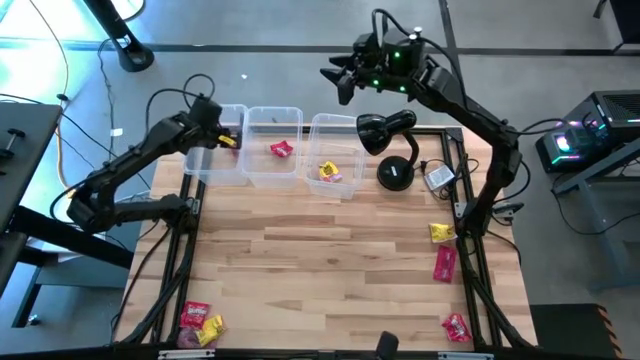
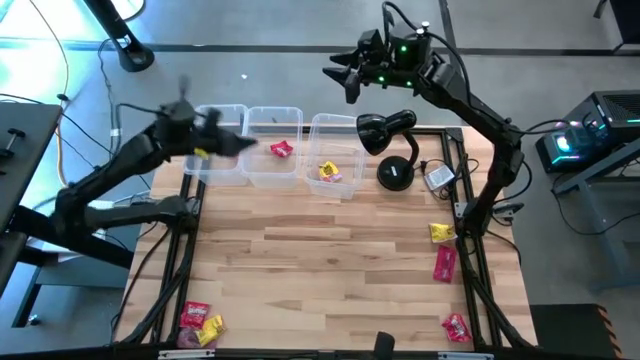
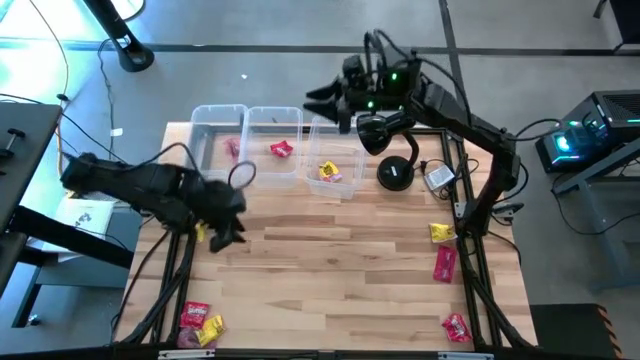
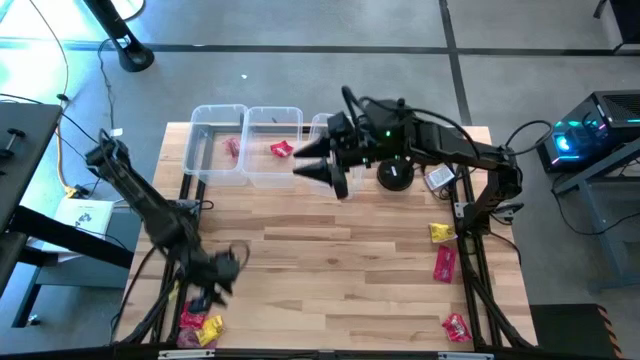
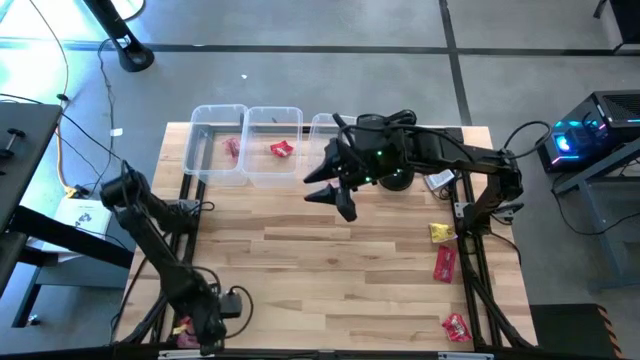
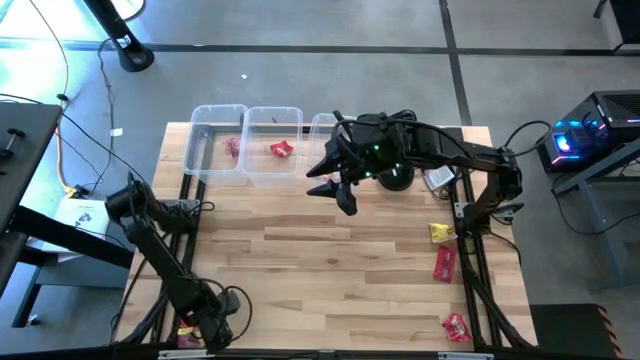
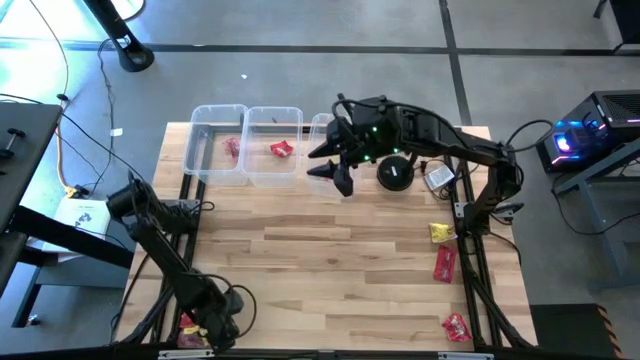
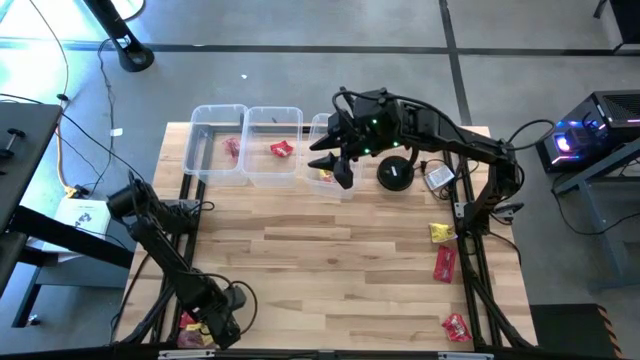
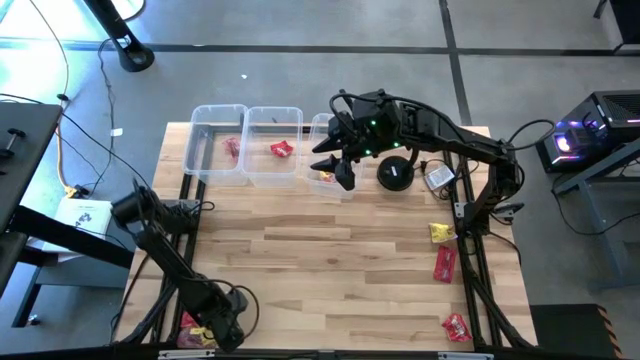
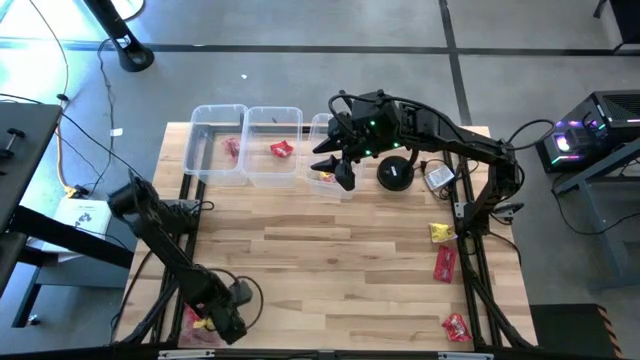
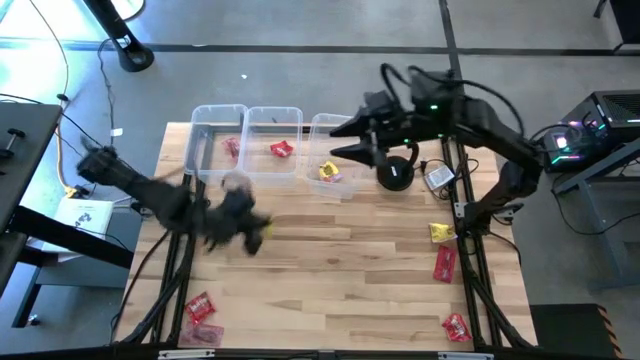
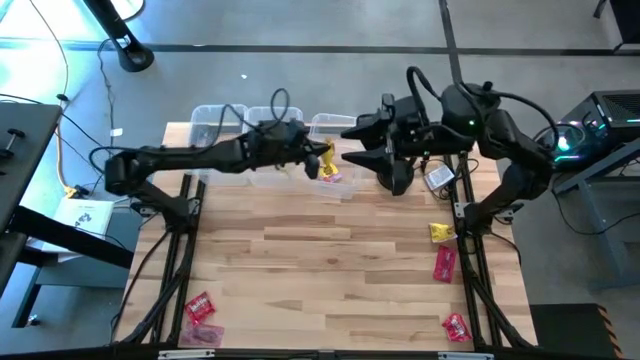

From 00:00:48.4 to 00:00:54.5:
Task: Sort candy
Put the yellow candy wrapper into the right transparent bin

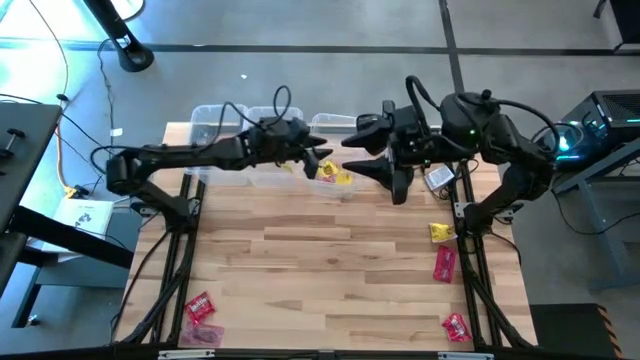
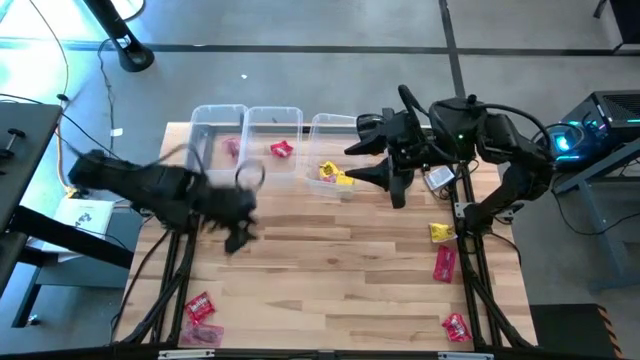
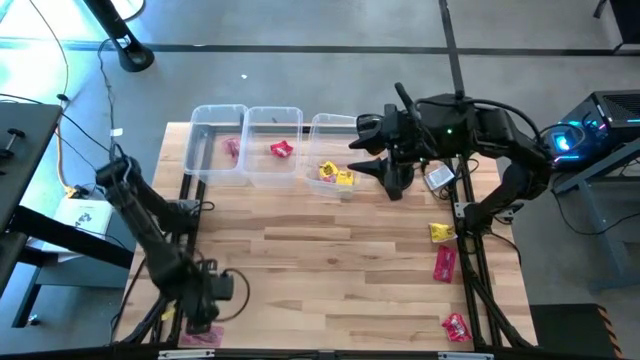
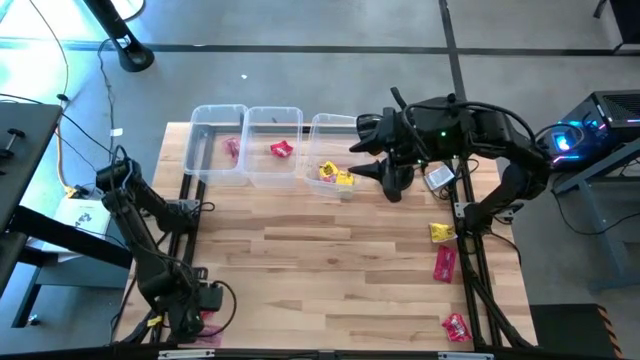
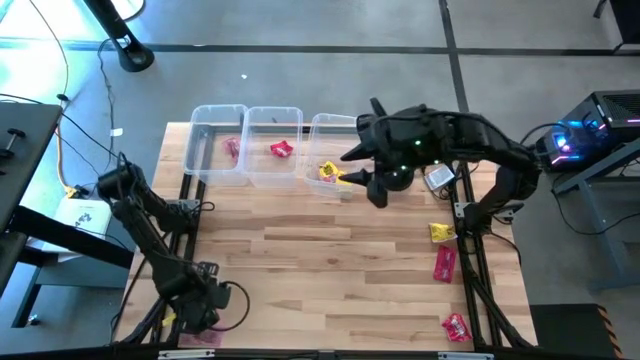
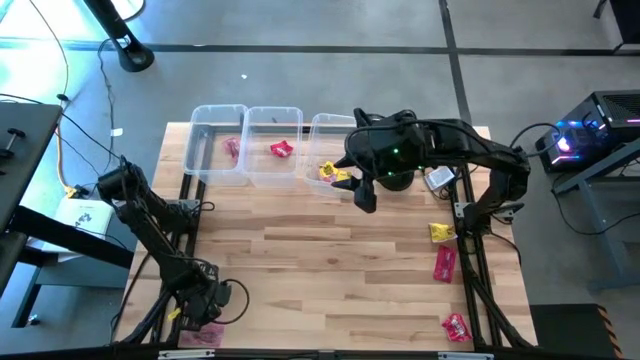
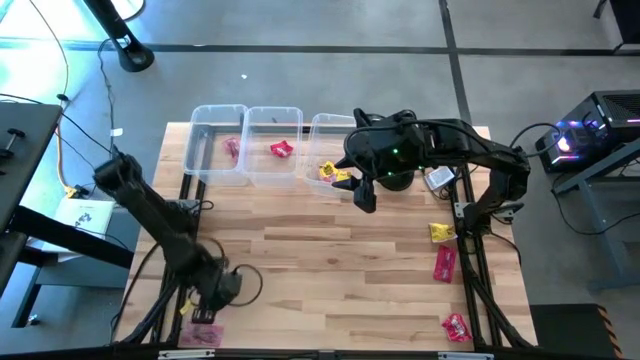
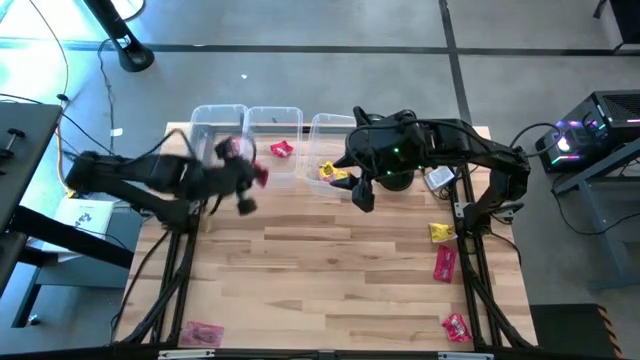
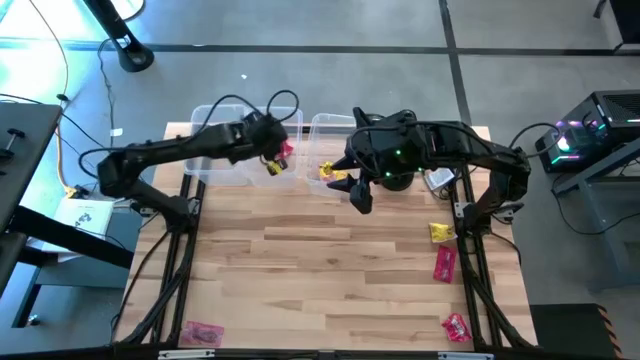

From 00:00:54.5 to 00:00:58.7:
Put the red candy wrapper into the middle transparent bin

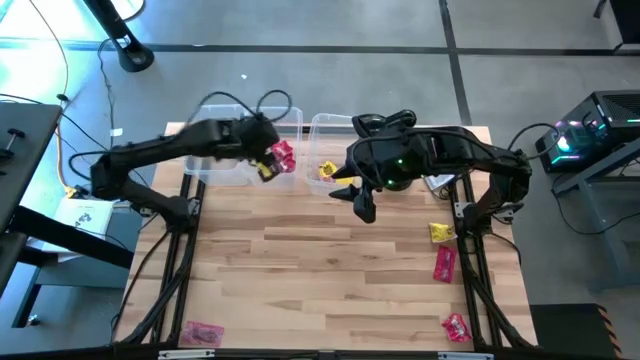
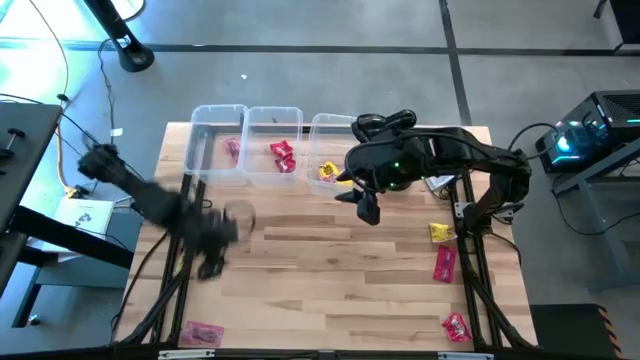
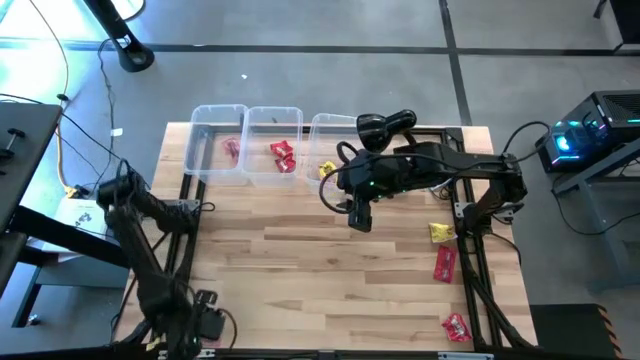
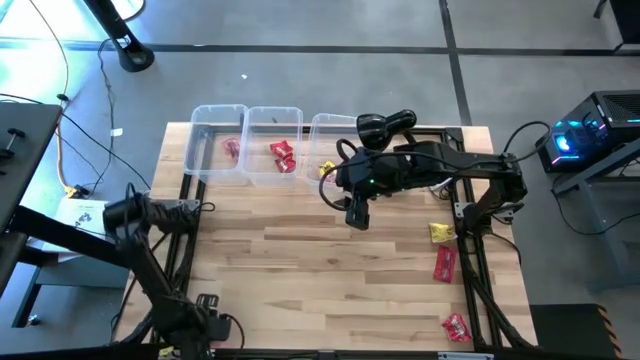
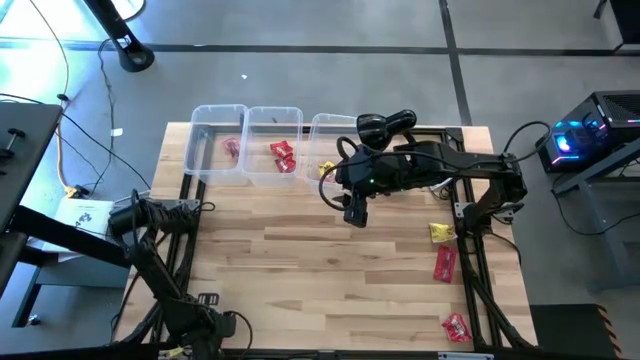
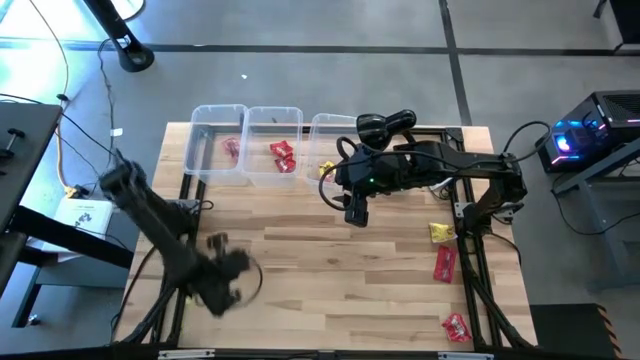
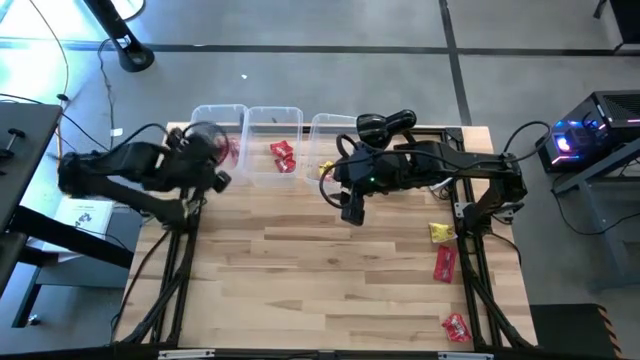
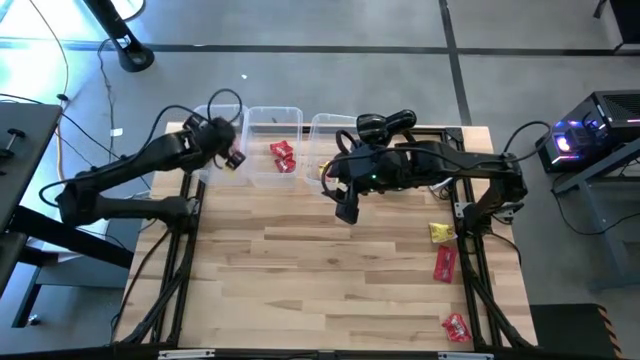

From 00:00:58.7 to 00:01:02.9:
Put the pink candy wrapper into the left transparent bin

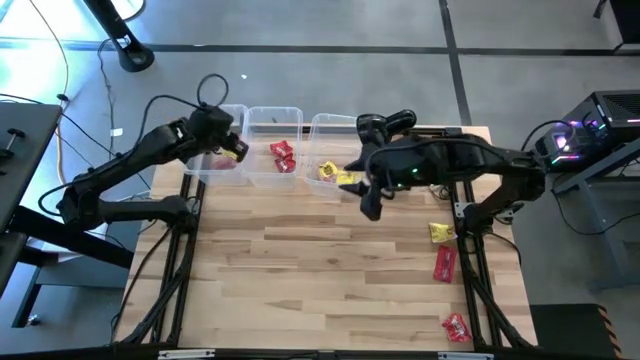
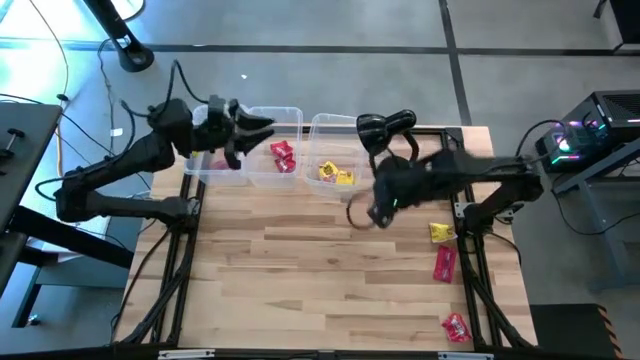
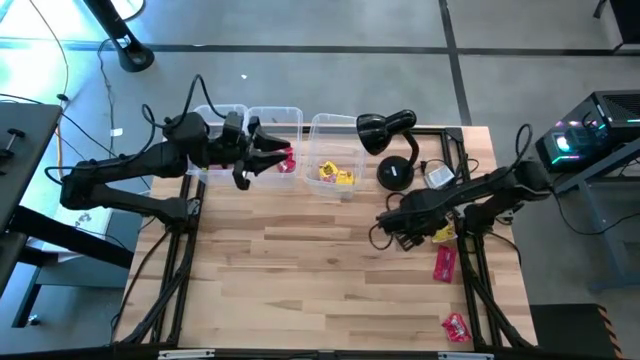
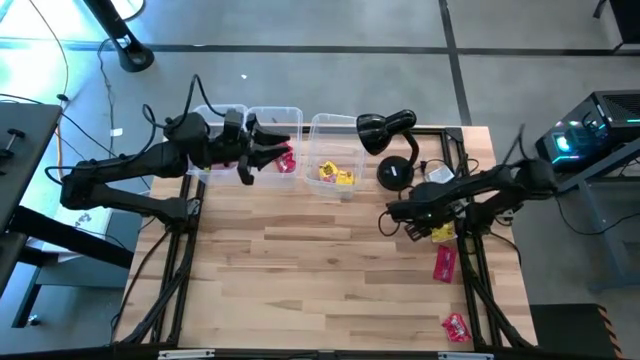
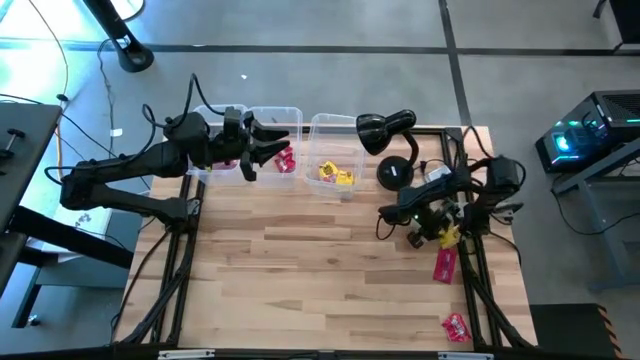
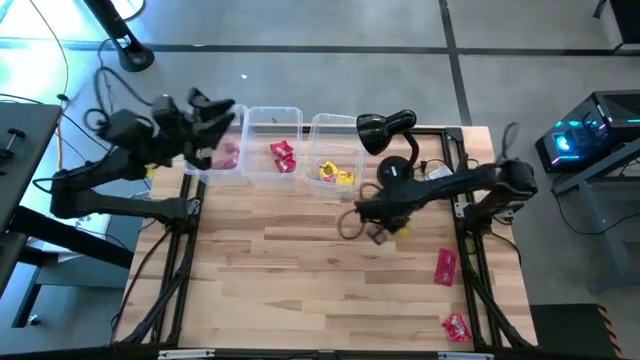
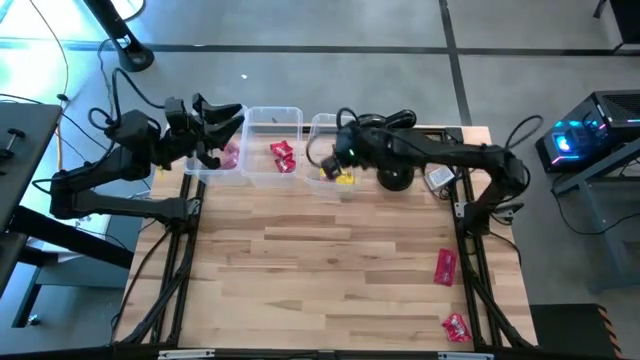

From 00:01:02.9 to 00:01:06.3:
Put the yellow candy wrapper into the right transparent bin

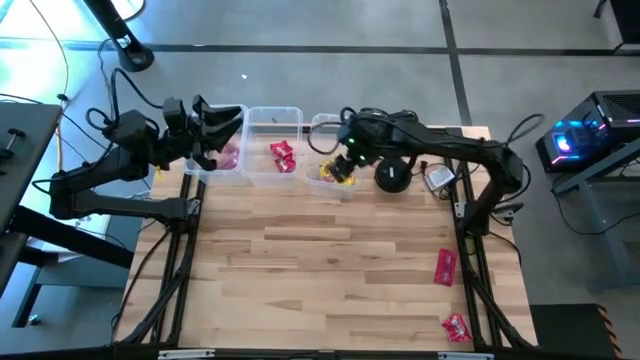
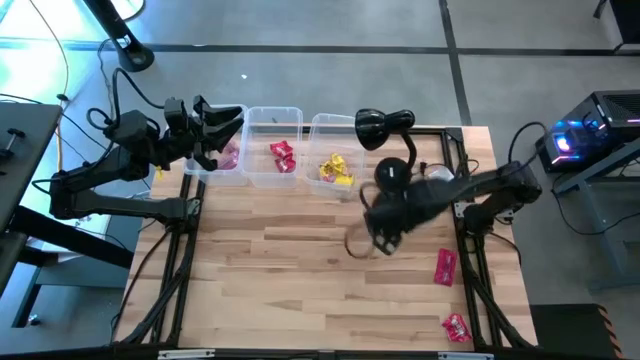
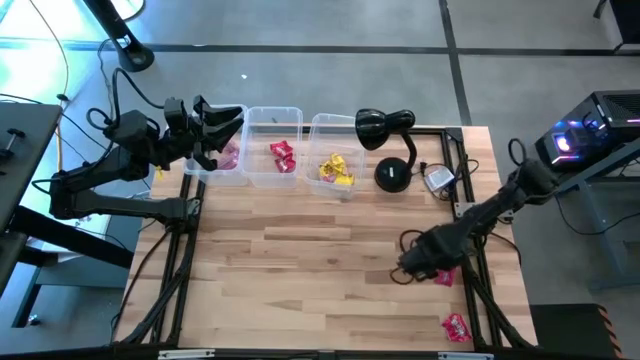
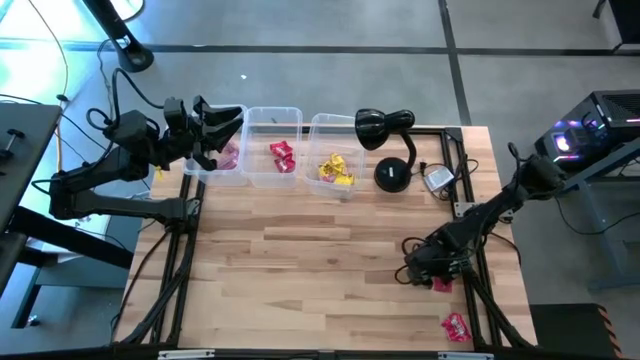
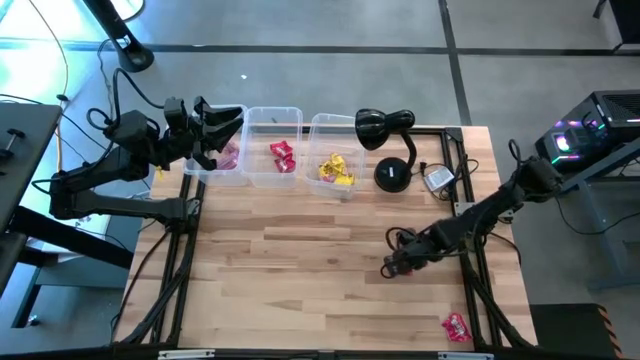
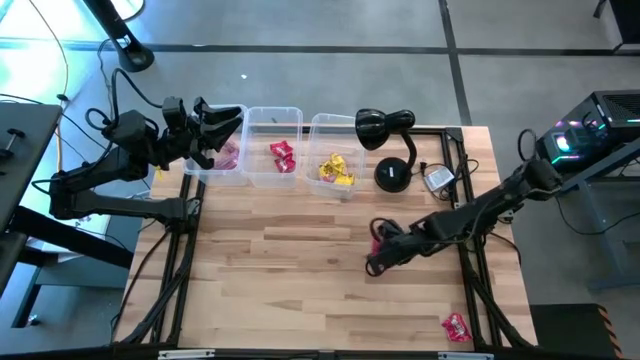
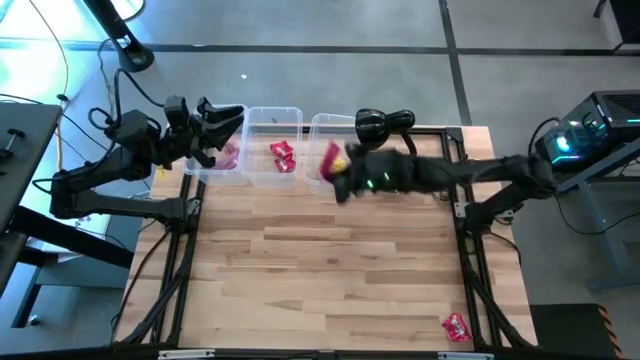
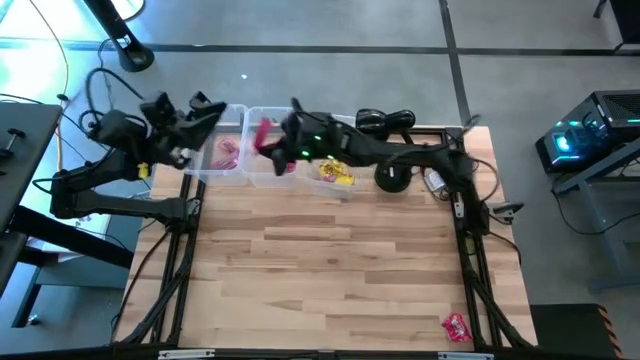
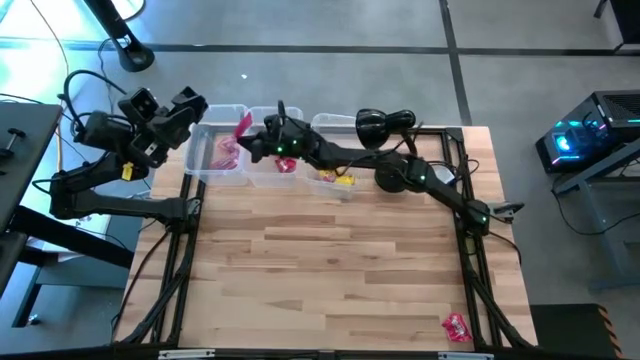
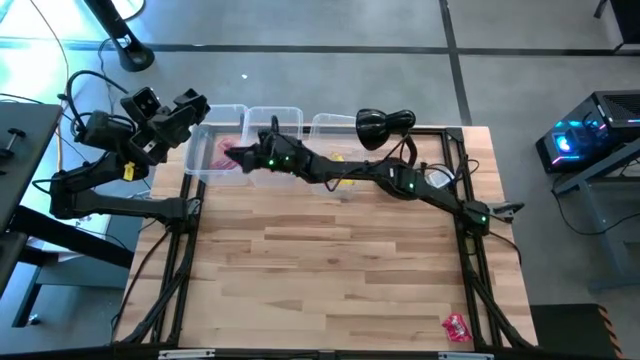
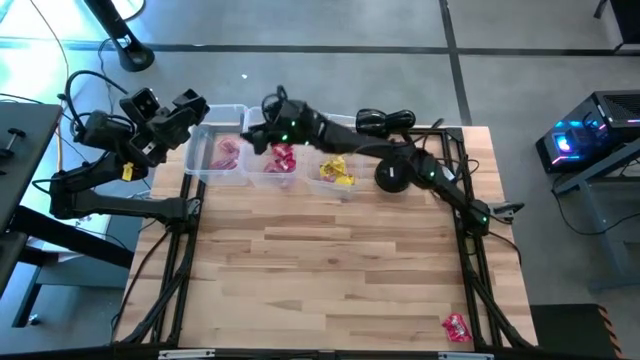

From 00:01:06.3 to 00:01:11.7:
Put the pink candy wrapper into the left transparent bin
